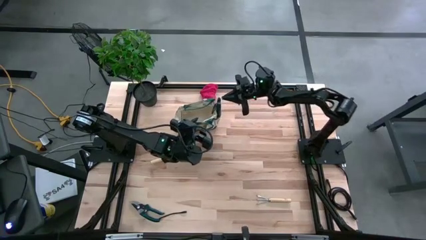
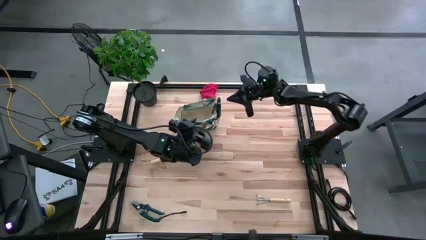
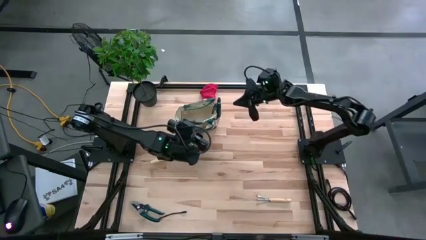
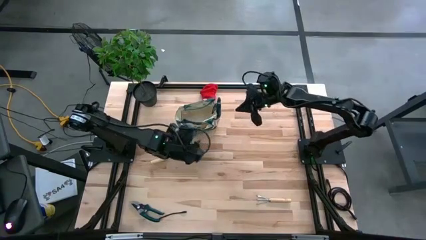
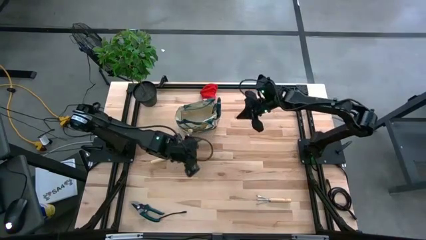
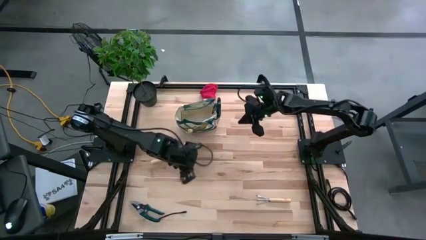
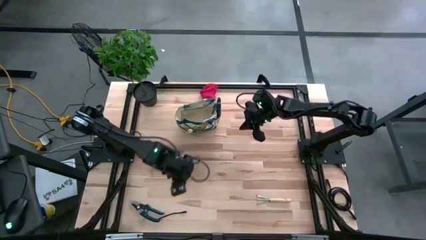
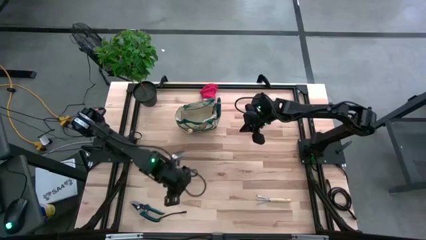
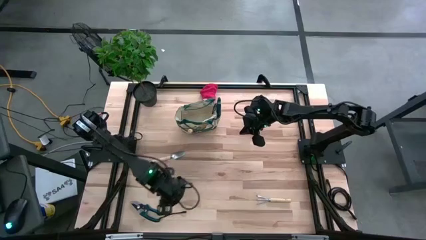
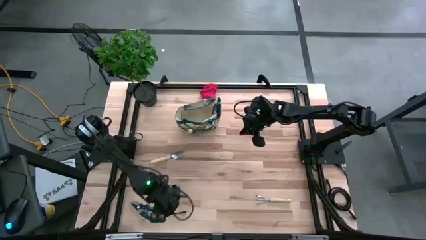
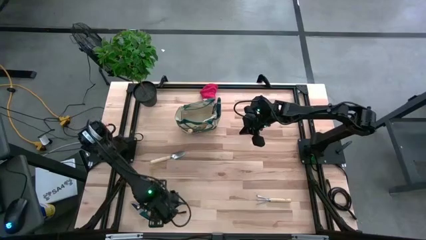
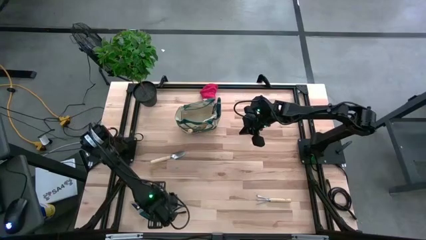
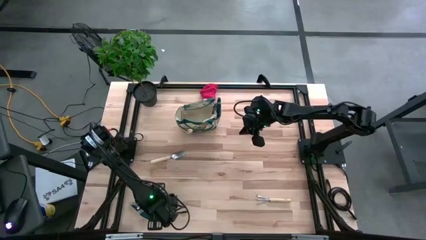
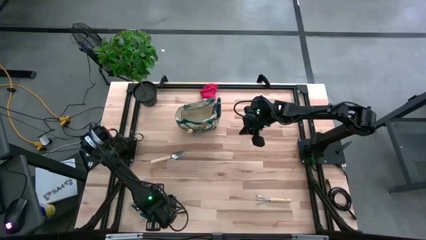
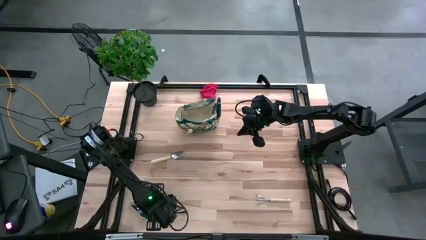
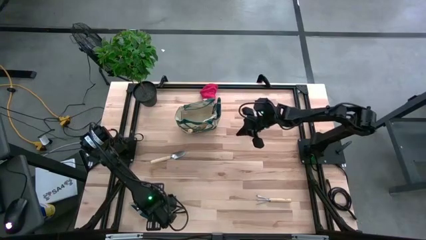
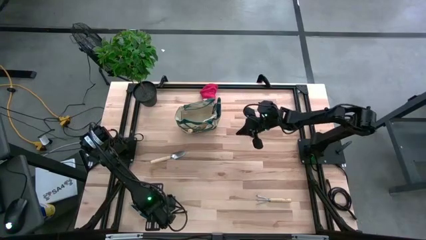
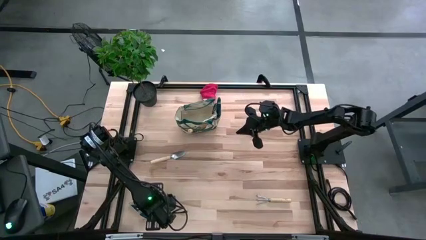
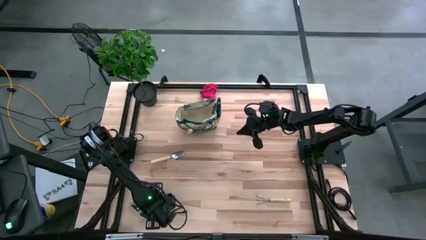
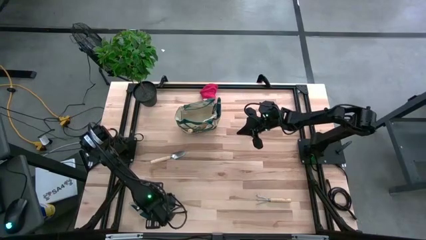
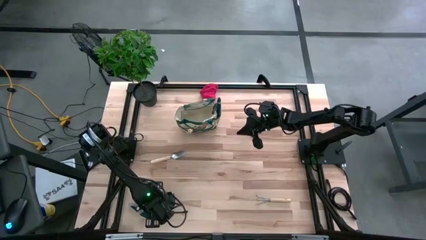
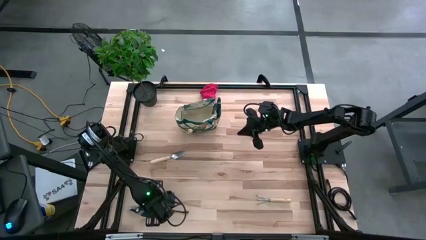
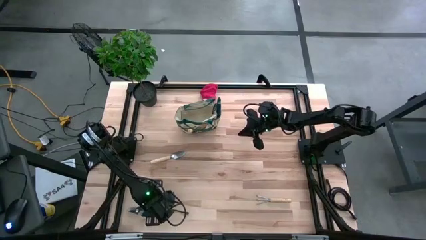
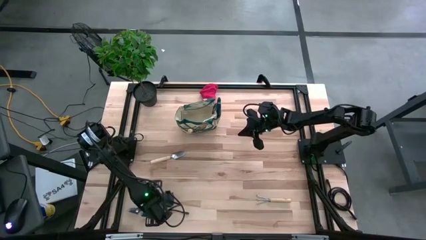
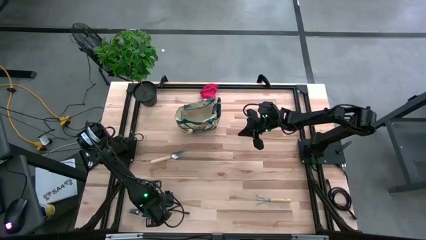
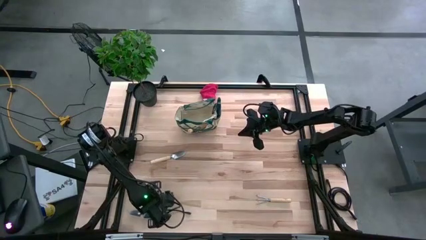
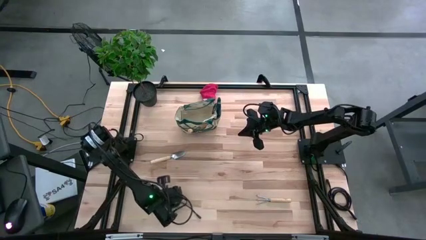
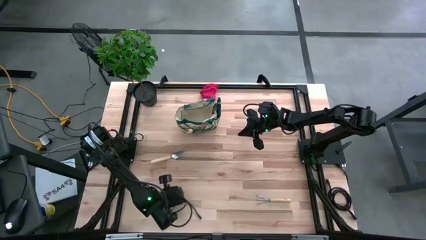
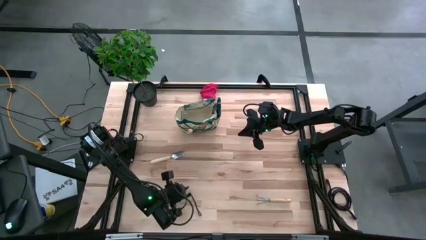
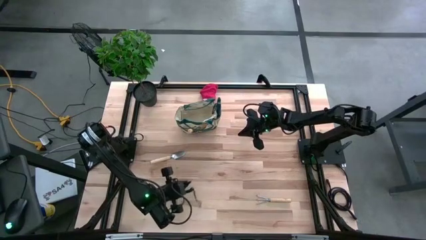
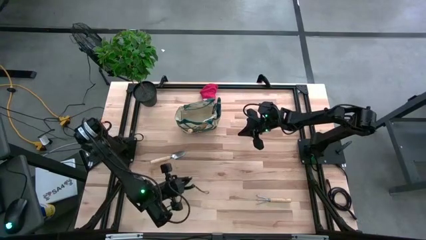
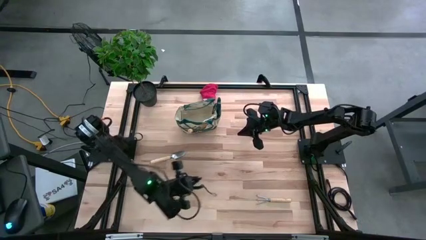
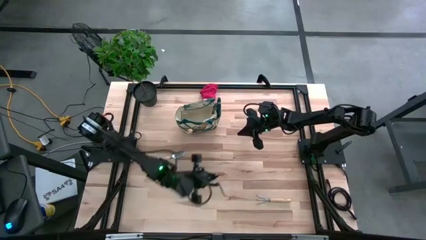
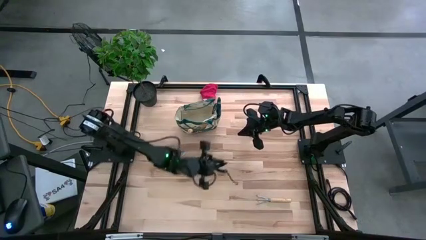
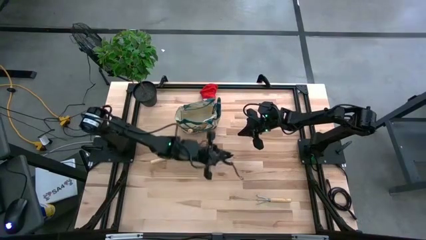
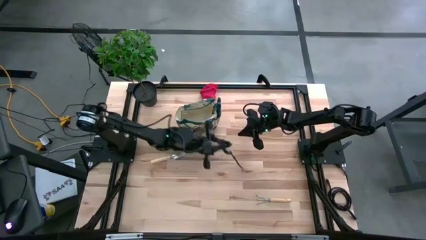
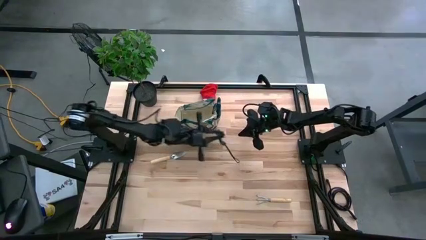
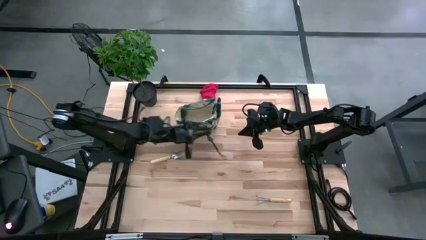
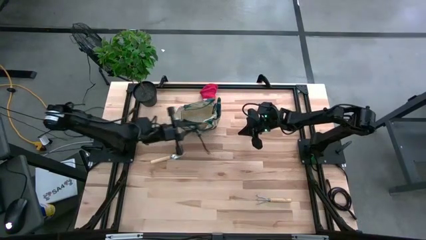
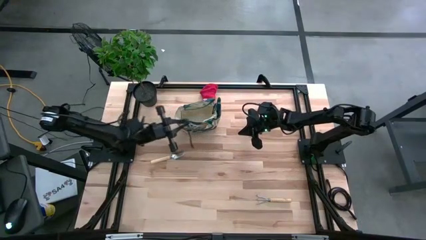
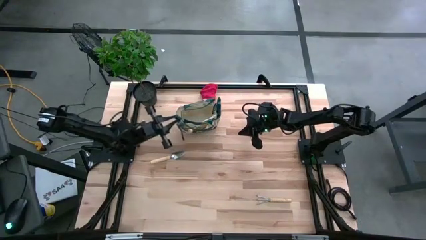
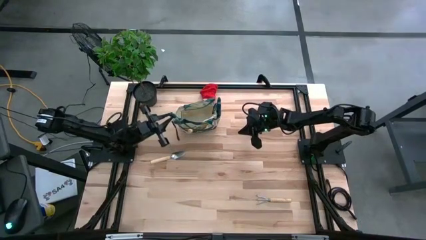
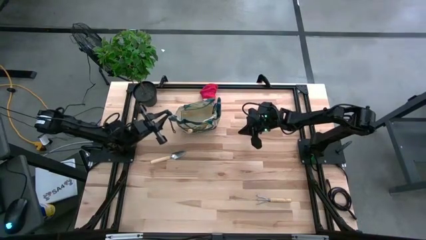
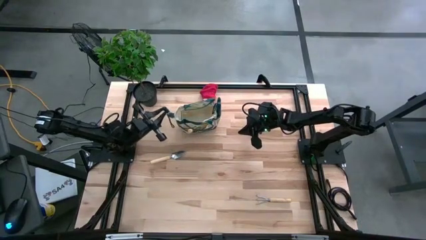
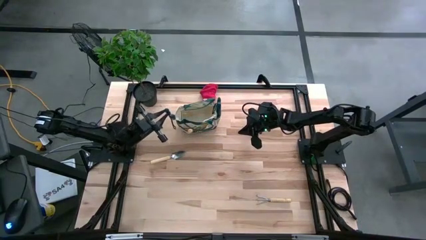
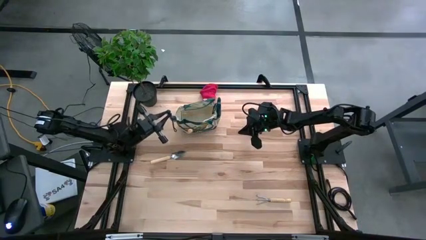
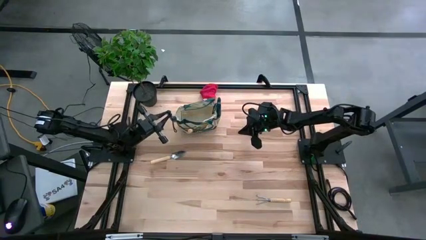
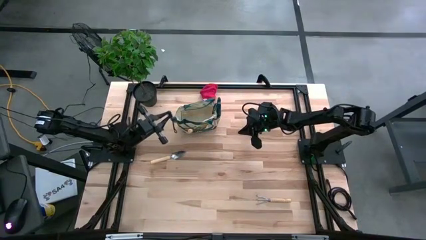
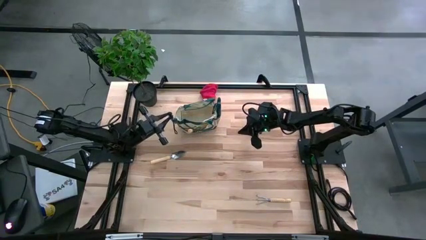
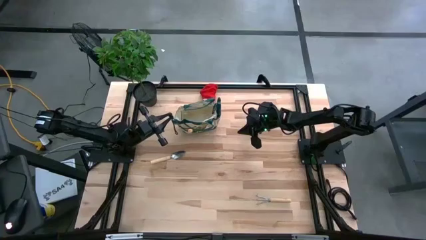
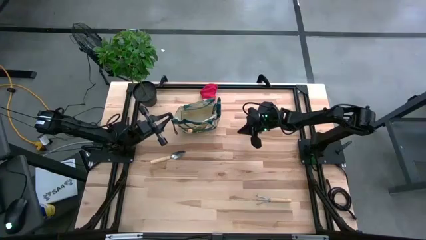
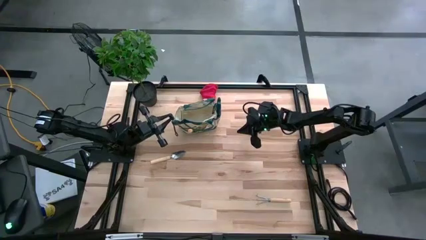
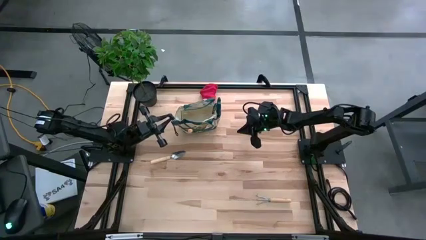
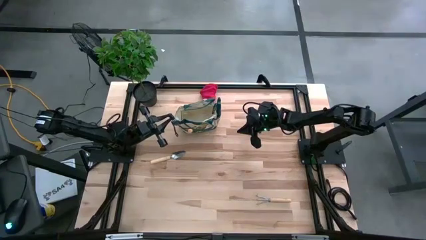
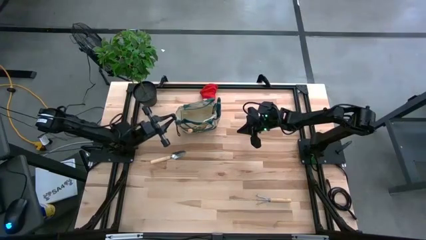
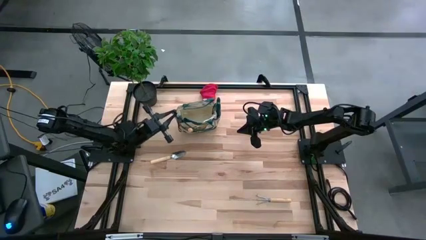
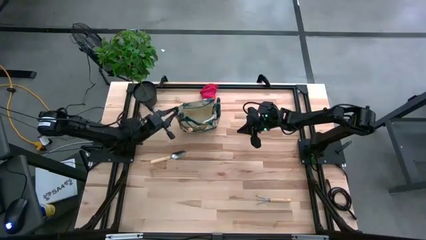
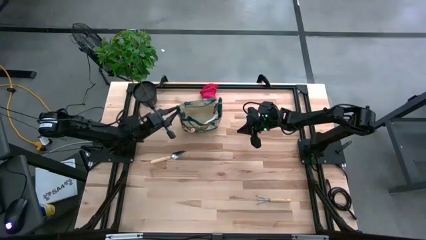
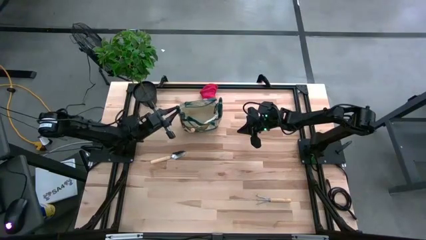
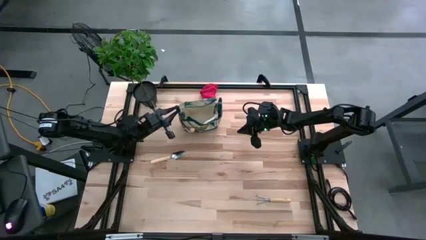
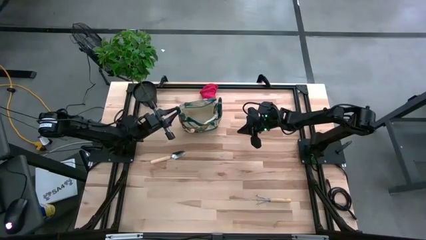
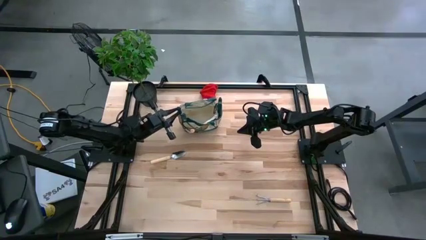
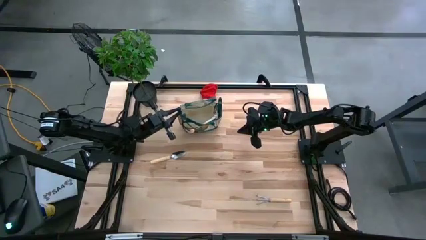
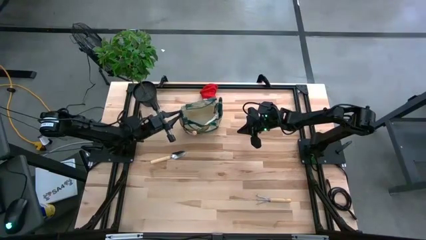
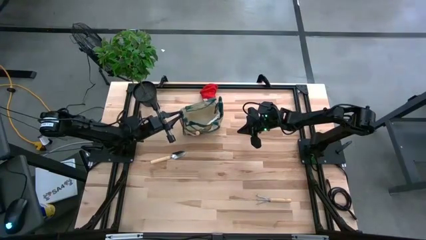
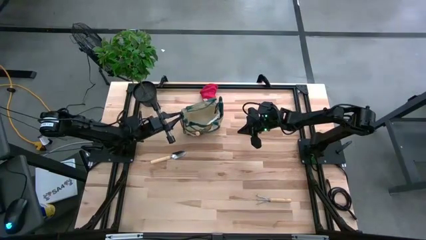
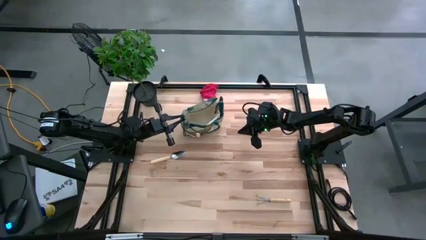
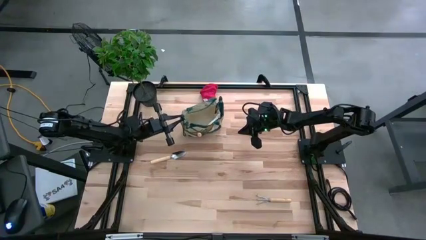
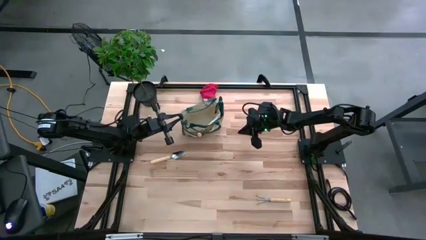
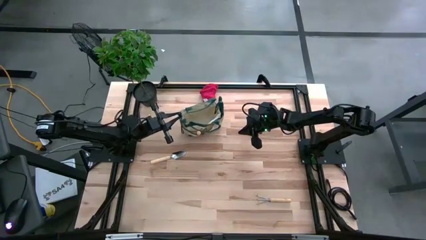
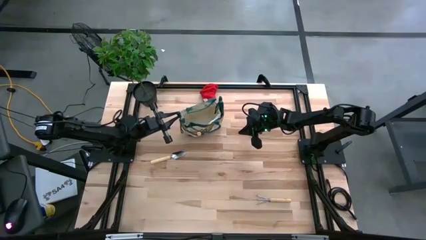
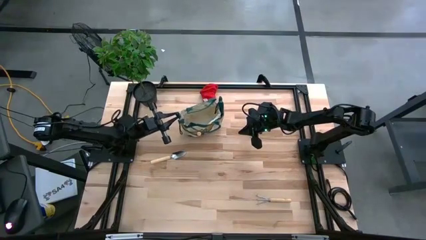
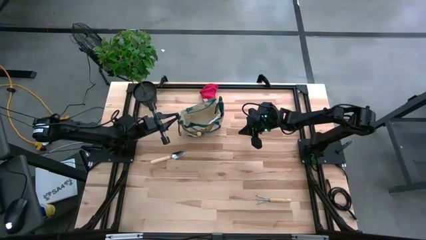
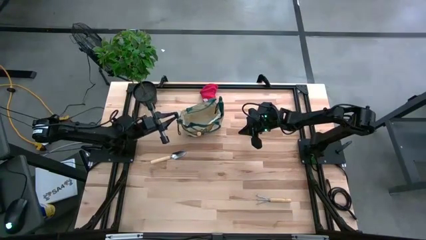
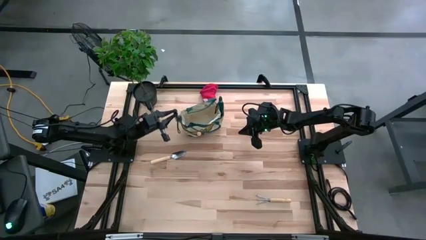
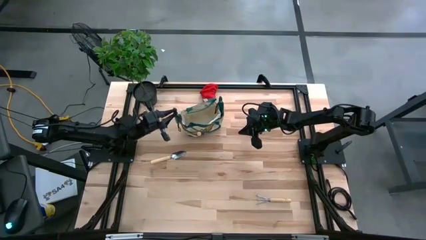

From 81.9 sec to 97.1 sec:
Task: Pick & Place Garden tools in Gardening bag
Put the shear scissor into the gardening bag
